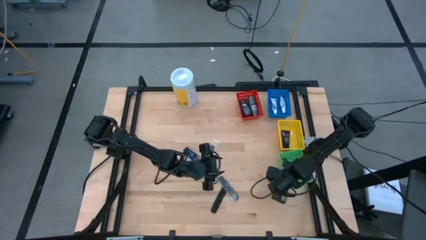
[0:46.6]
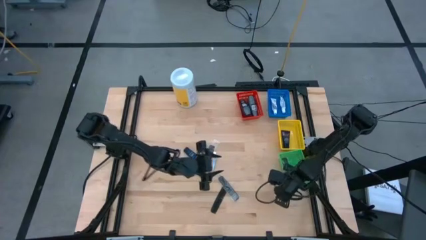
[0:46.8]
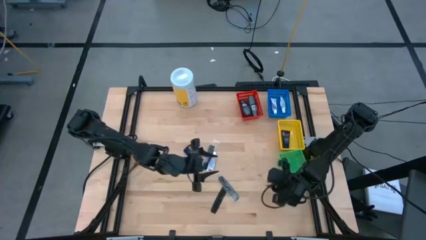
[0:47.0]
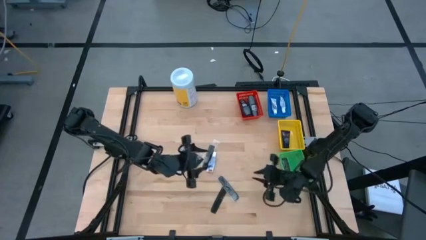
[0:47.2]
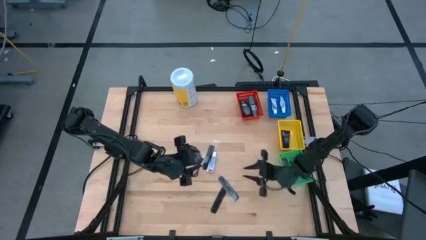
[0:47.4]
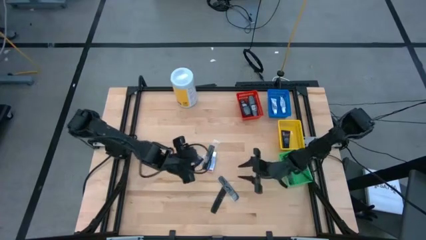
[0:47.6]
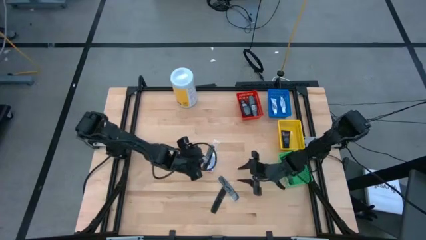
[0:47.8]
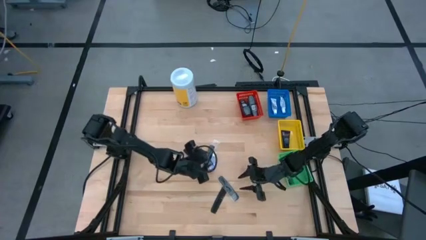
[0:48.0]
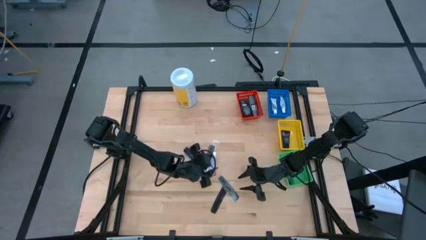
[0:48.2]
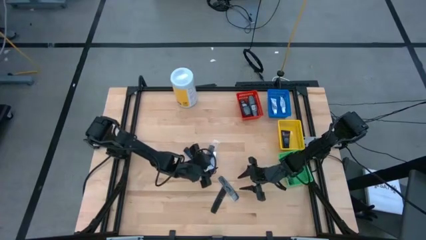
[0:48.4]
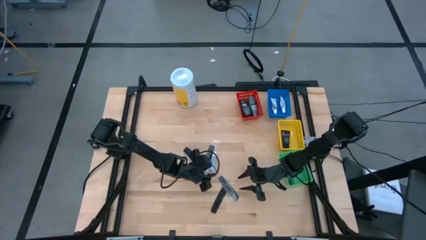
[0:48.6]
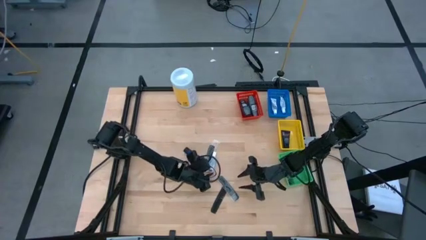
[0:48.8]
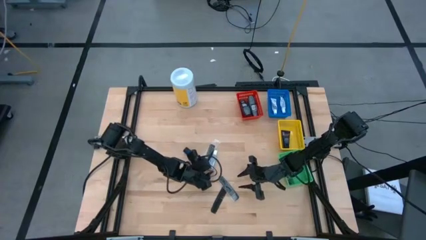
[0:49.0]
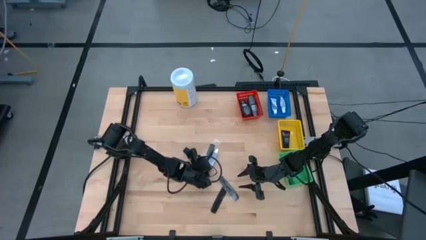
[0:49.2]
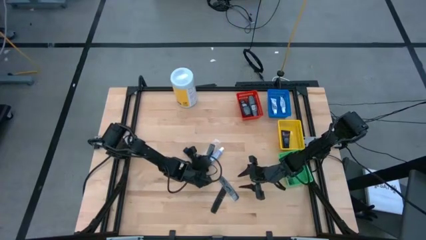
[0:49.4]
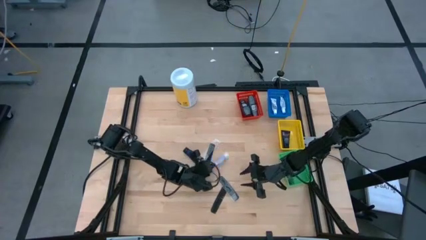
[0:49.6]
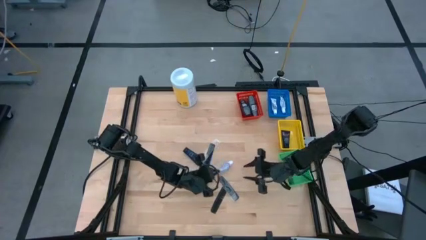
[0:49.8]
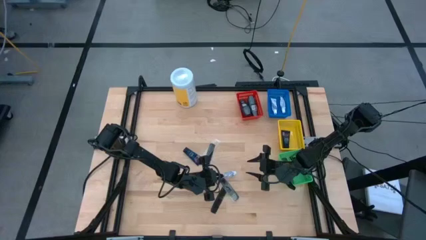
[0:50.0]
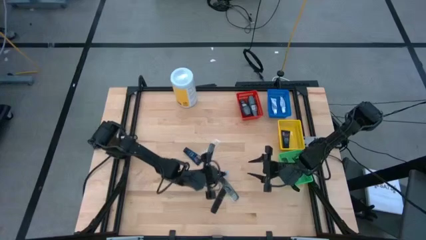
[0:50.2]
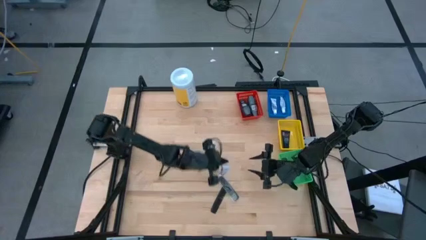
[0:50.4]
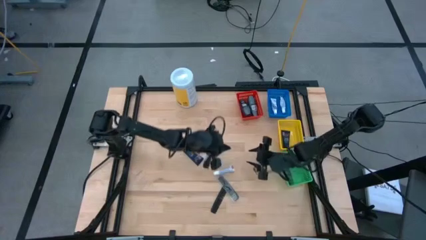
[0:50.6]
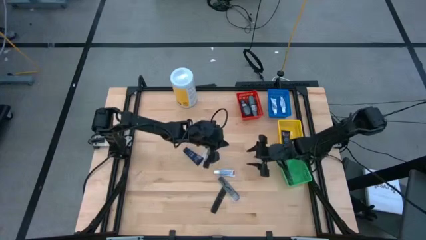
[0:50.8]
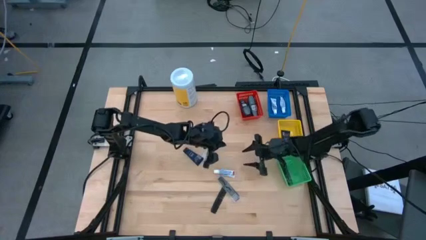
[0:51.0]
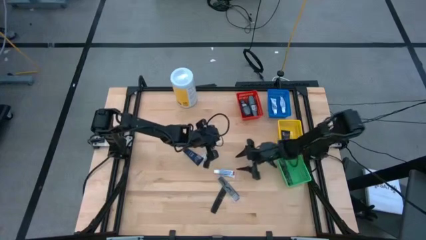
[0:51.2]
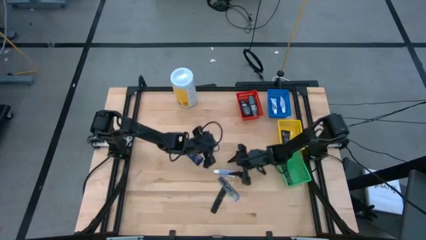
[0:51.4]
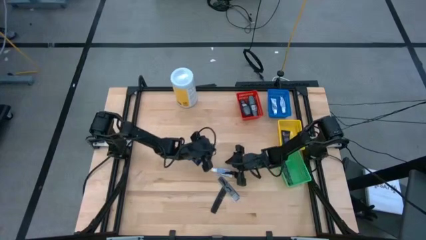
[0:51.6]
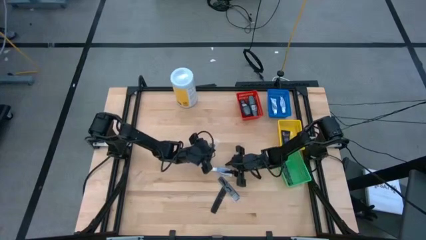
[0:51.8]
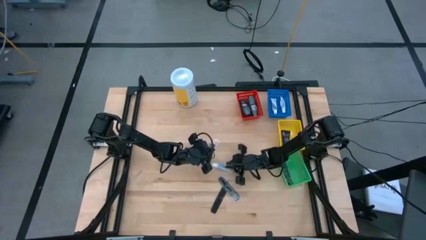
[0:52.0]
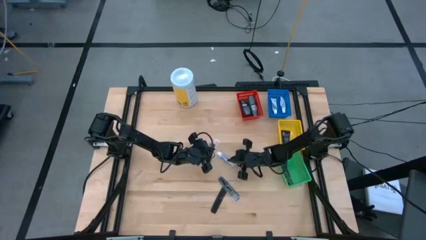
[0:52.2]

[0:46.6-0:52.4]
Task: Pick & Place Travel size toiletries
Put the white toothpaste into the blue bin

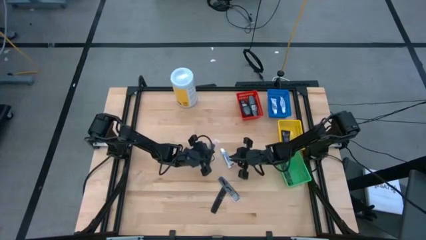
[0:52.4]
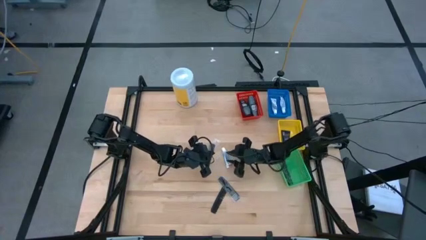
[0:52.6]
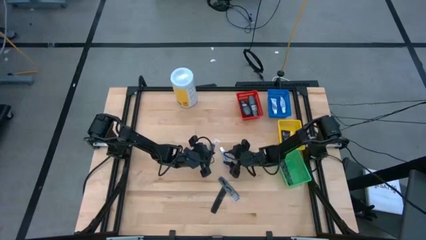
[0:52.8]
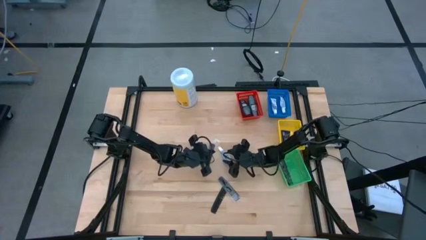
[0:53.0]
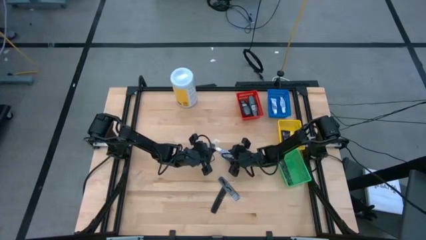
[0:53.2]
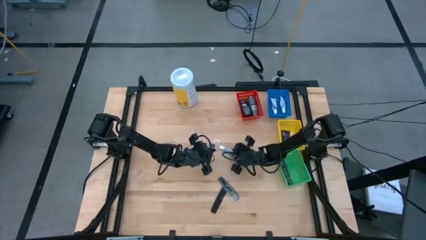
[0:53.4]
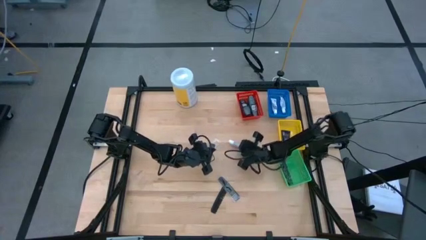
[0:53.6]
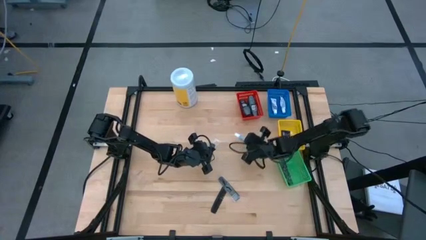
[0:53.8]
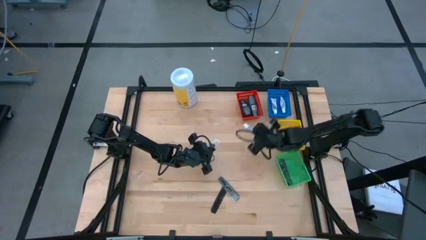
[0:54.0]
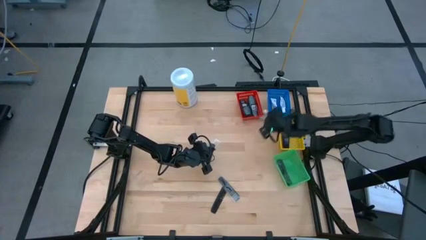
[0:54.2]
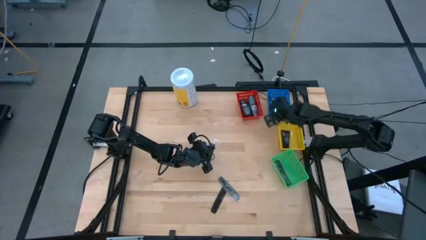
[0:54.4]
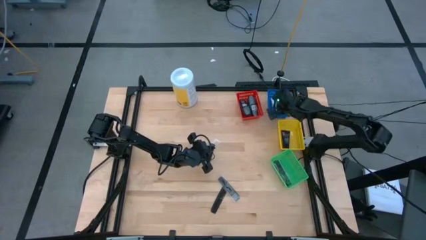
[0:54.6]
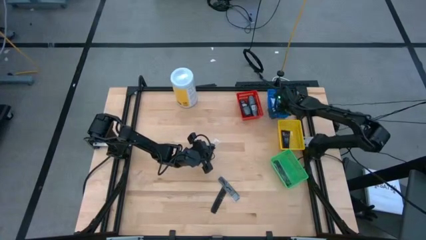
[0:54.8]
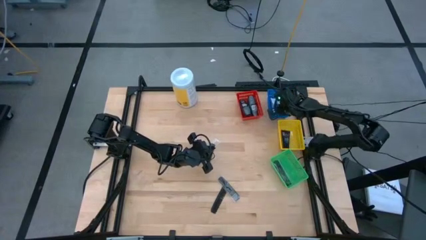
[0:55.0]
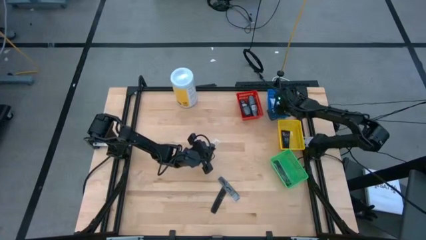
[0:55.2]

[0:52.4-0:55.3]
Put the white toothpaste into the blue bin

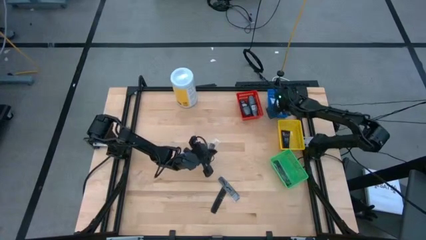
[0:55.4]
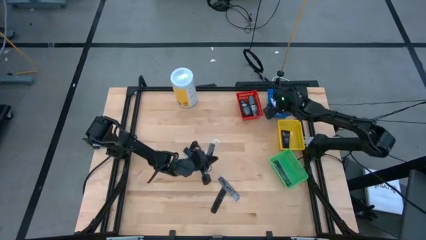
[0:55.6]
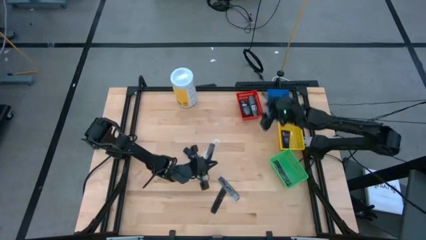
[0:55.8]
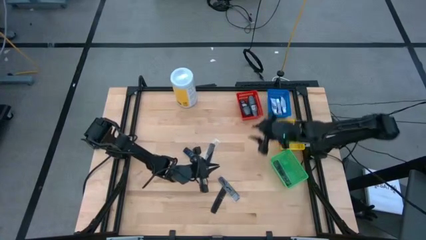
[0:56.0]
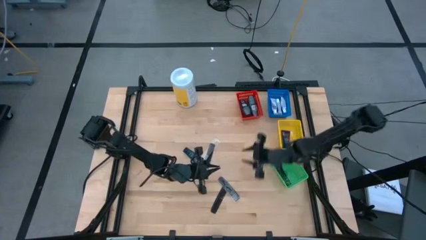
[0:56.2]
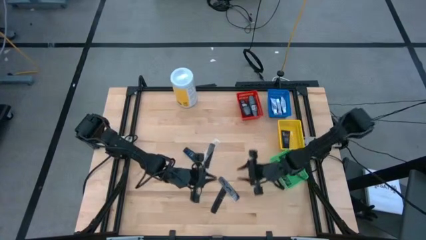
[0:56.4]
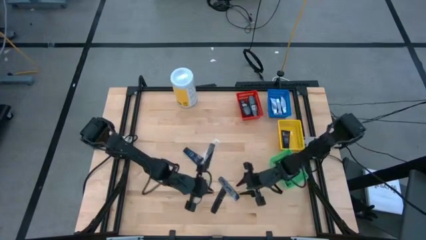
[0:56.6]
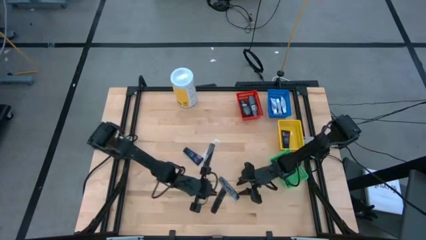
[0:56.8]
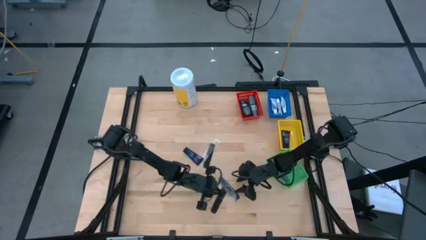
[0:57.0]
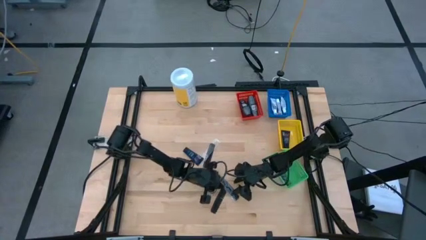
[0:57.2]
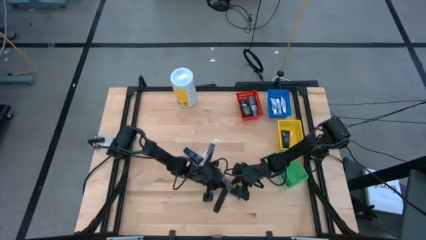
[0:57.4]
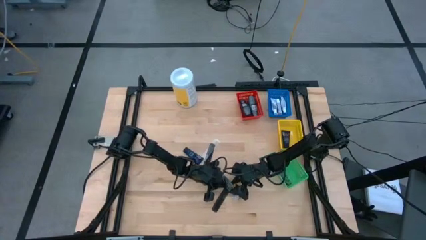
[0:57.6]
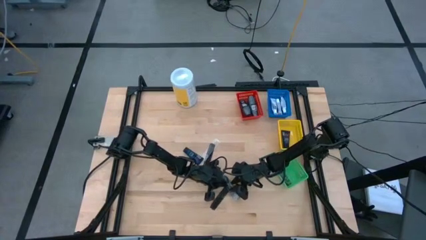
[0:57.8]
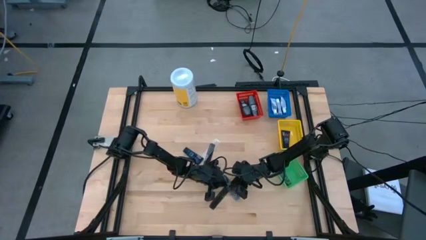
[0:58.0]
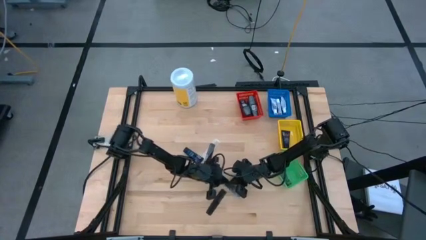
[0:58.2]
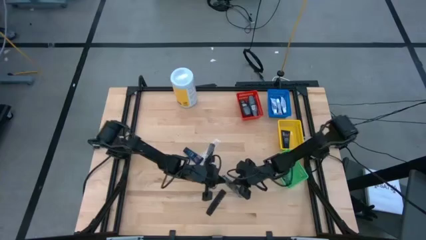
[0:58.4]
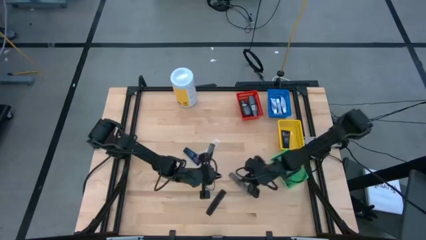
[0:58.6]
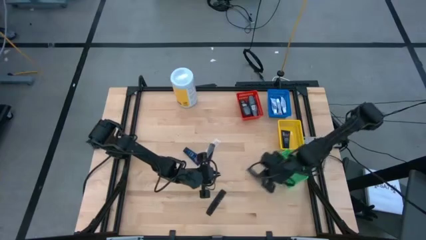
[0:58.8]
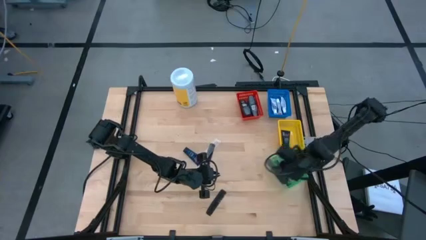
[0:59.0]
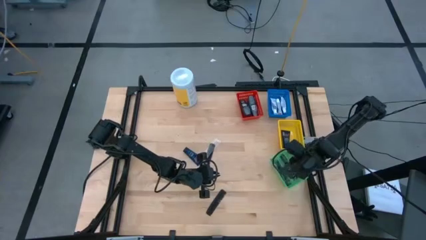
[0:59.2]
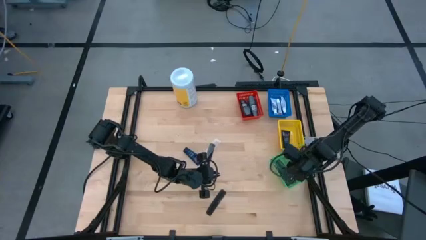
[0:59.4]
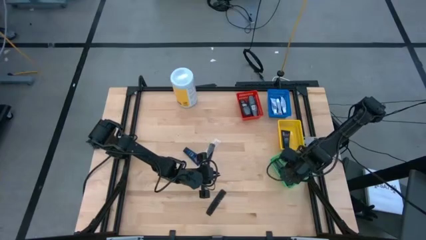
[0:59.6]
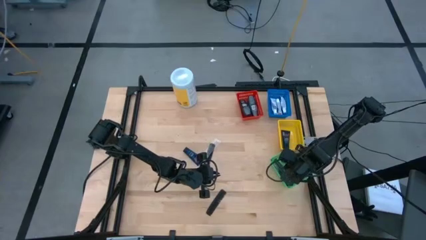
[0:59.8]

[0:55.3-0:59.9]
Put the black comb into the green bin

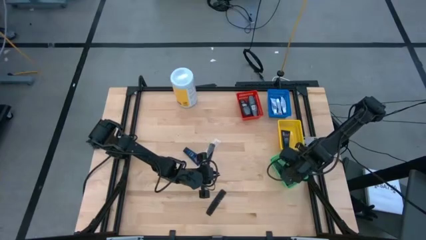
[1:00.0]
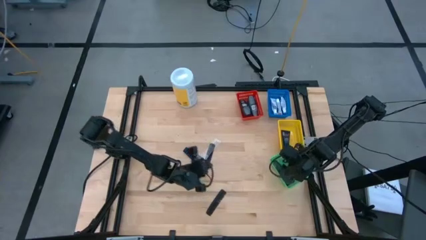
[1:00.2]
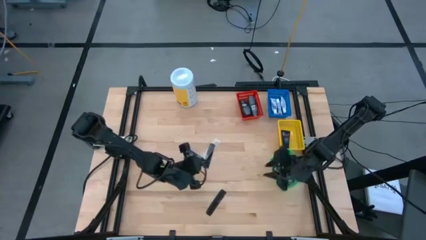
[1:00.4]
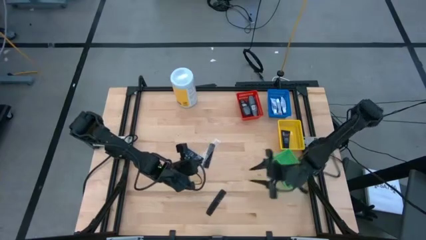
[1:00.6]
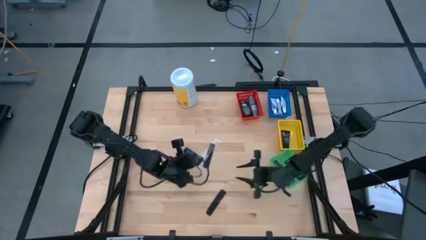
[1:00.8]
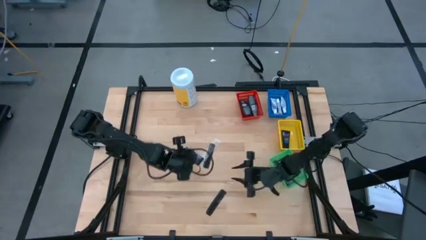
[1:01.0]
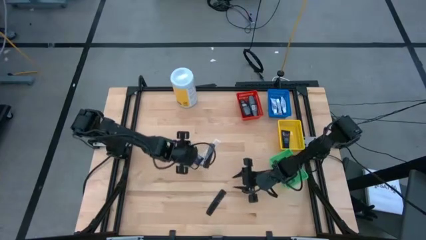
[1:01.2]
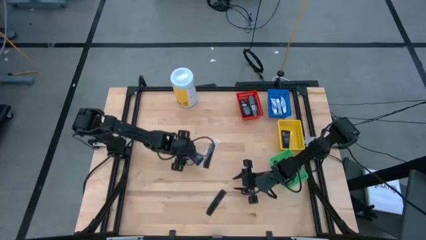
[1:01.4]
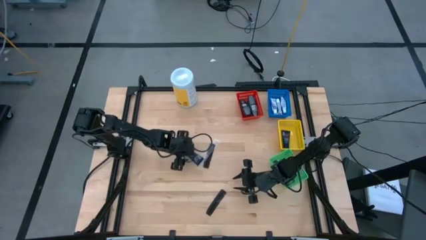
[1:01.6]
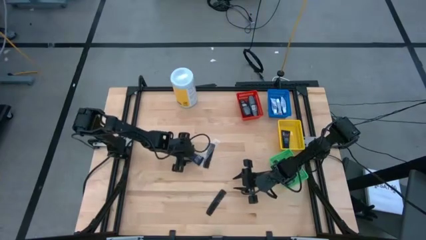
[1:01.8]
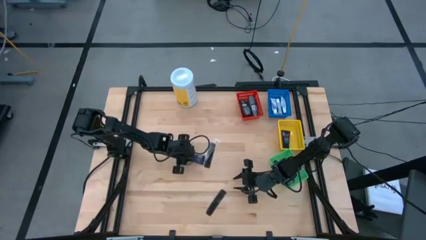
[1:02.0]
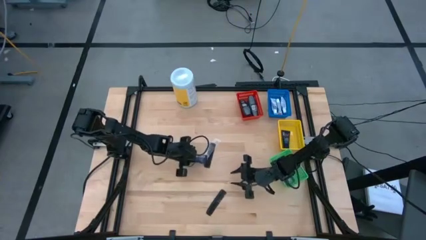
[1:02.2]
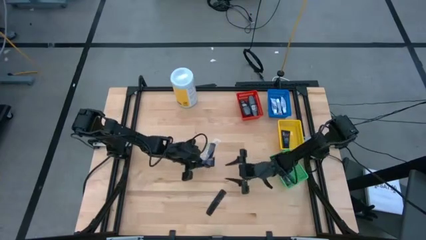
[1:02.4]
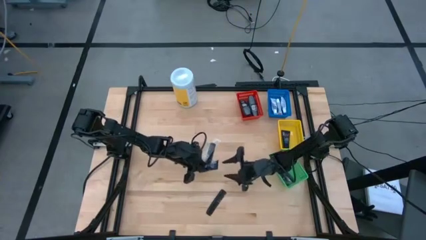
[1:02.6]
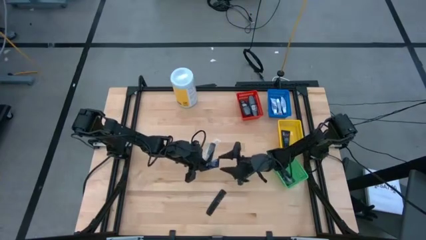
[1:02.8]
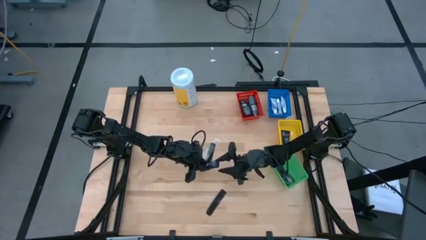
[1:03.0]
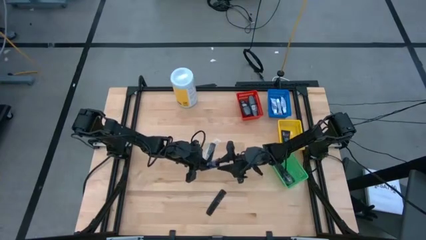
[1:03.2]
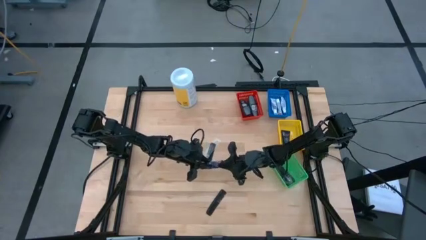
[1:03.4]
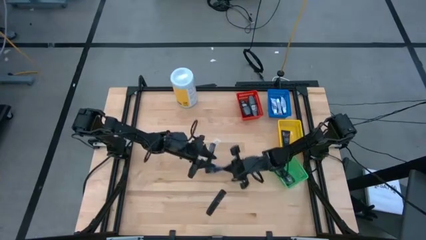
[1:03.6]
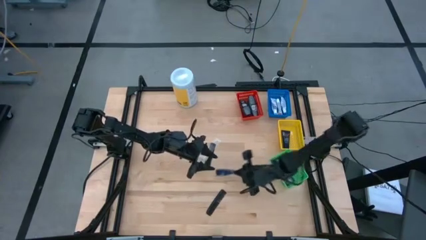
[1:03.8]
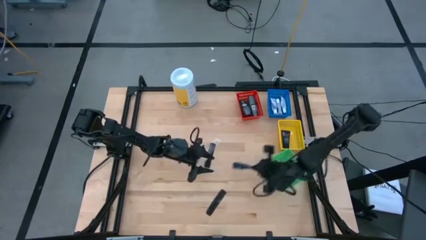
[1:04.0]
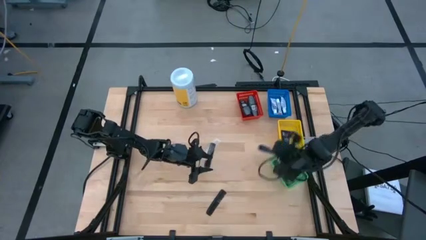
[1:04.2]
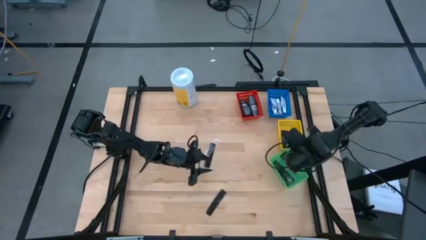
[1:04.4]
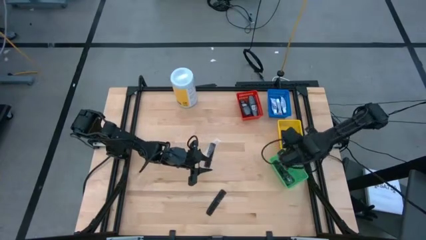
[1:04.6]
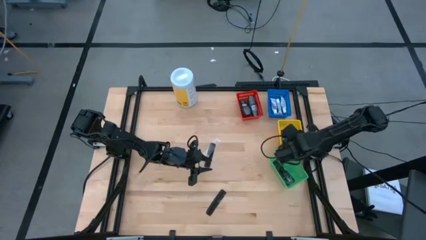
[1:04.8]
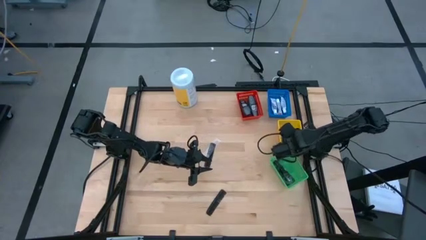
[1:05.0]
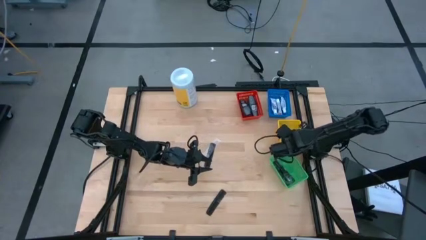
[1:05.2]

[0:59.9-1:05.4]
Put the black shaving cream into the yellow bin
